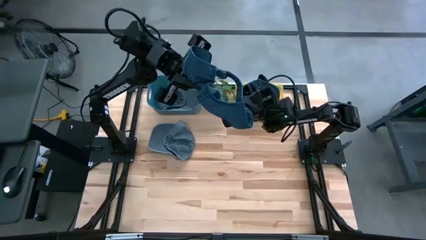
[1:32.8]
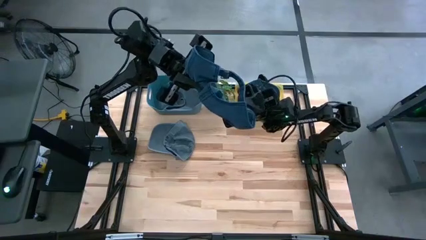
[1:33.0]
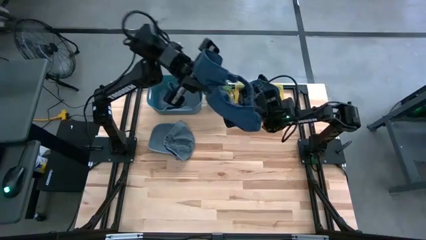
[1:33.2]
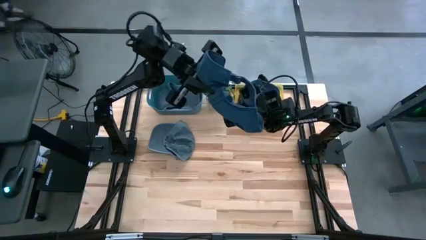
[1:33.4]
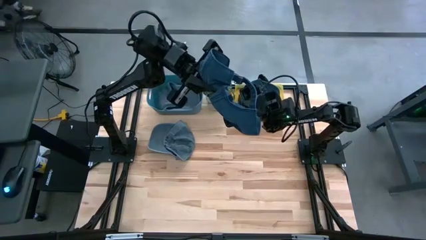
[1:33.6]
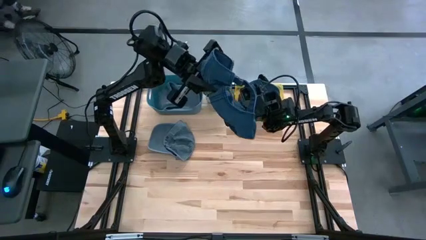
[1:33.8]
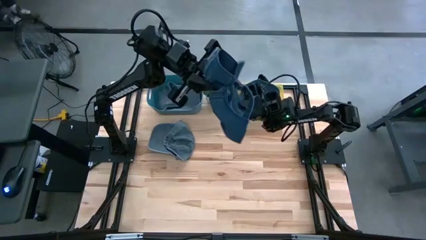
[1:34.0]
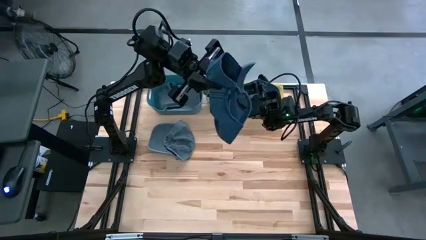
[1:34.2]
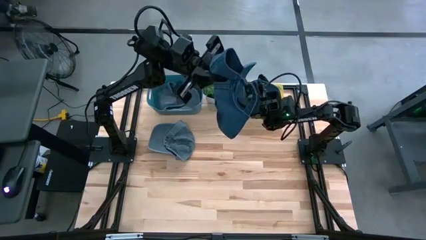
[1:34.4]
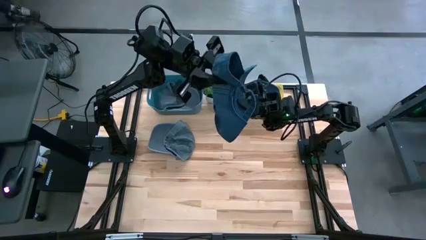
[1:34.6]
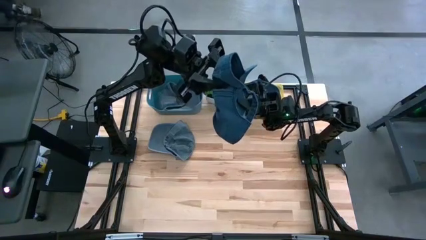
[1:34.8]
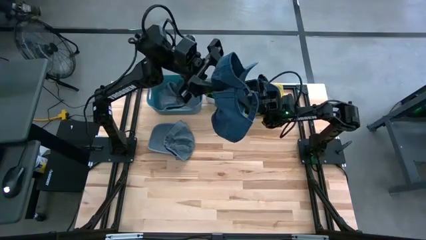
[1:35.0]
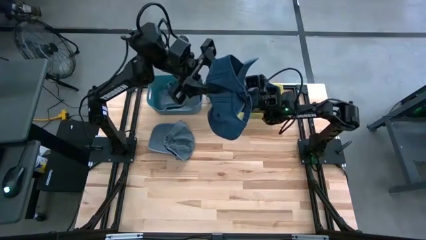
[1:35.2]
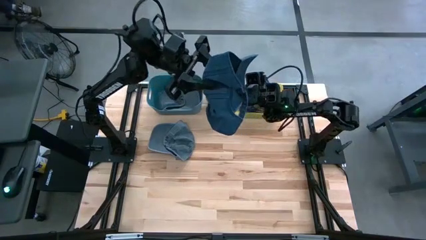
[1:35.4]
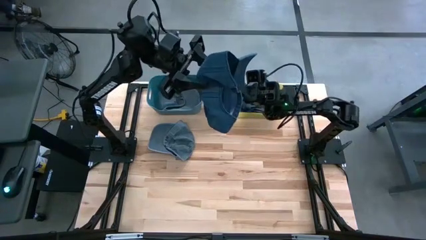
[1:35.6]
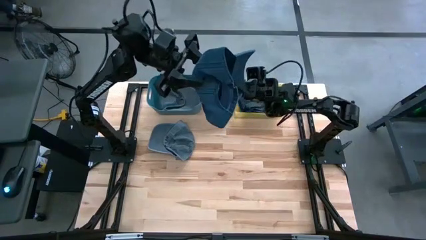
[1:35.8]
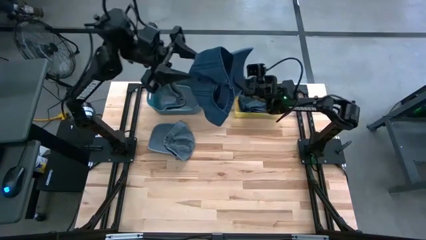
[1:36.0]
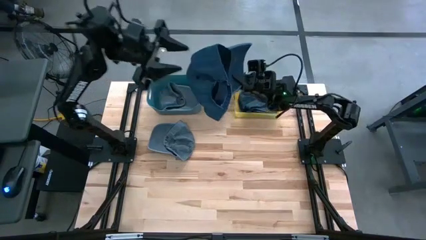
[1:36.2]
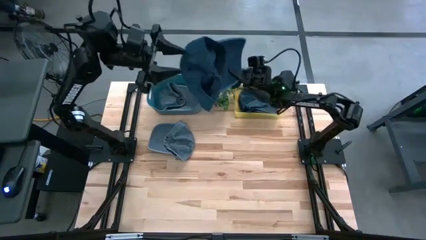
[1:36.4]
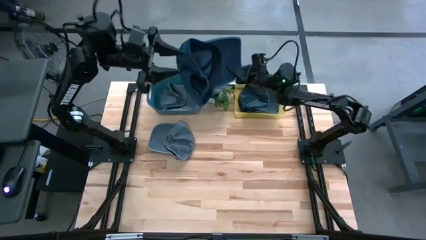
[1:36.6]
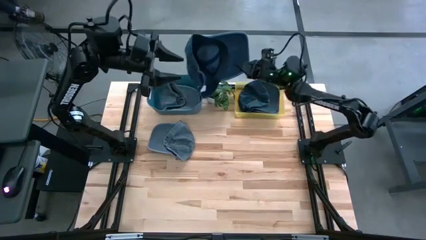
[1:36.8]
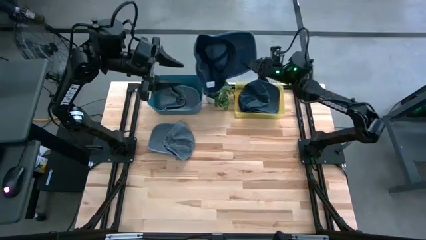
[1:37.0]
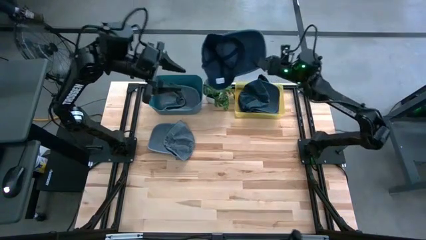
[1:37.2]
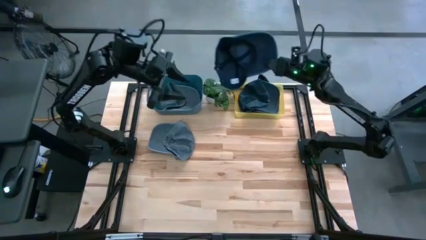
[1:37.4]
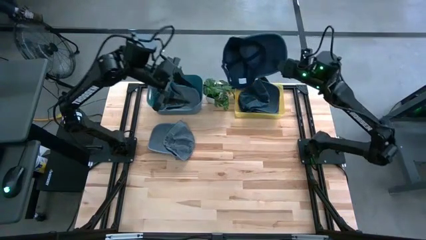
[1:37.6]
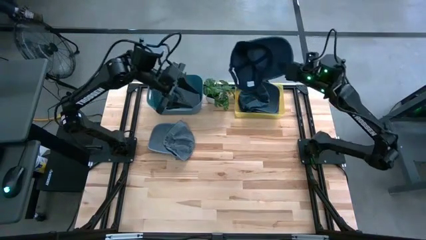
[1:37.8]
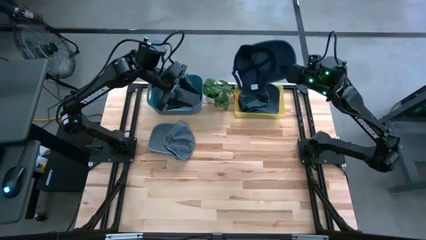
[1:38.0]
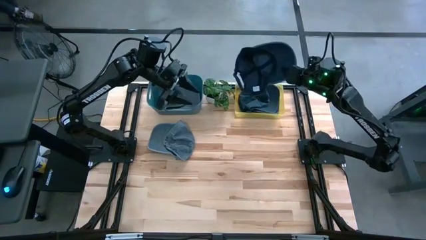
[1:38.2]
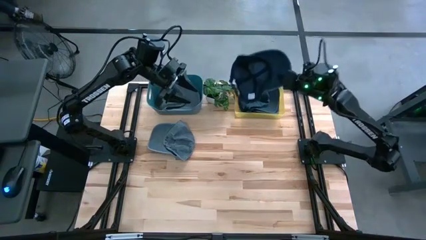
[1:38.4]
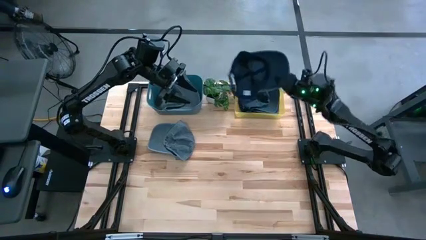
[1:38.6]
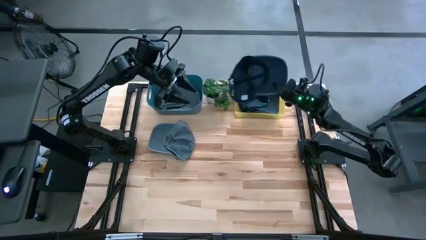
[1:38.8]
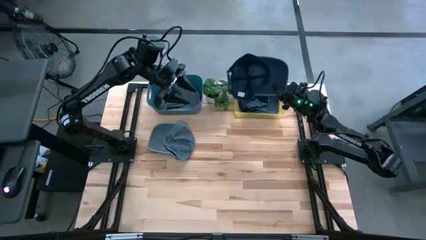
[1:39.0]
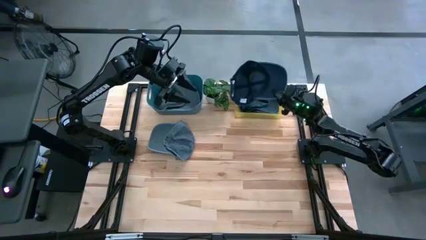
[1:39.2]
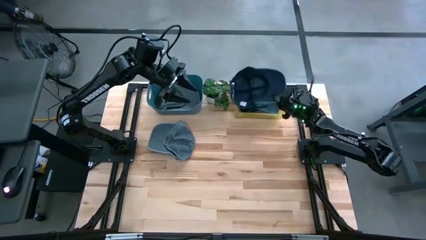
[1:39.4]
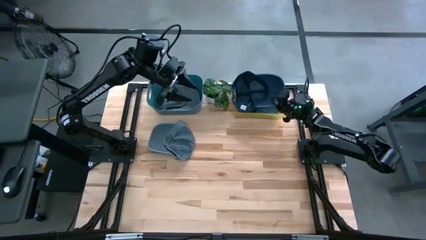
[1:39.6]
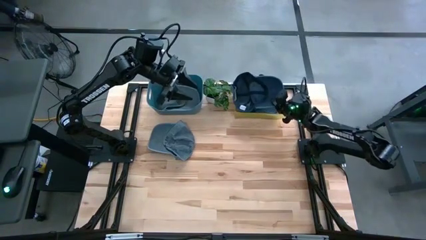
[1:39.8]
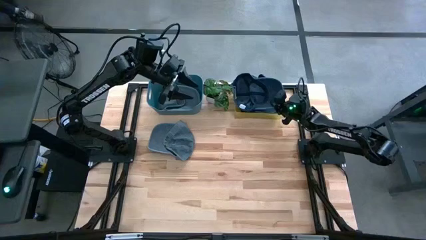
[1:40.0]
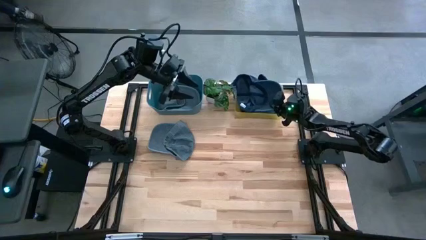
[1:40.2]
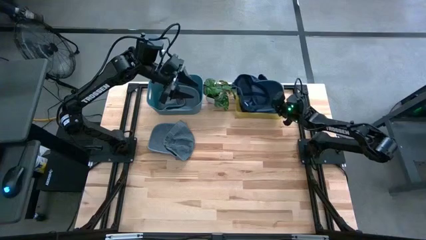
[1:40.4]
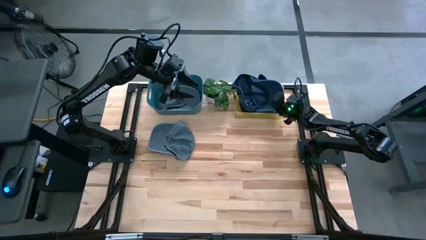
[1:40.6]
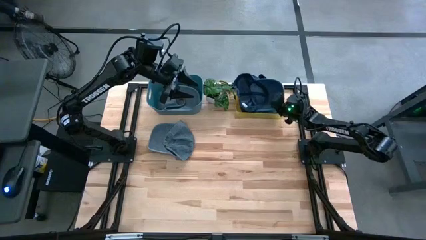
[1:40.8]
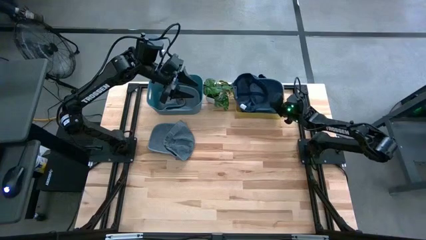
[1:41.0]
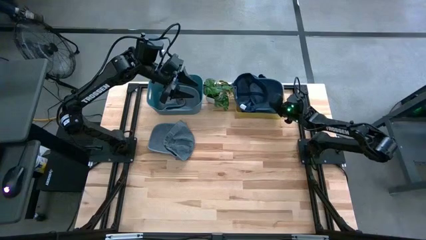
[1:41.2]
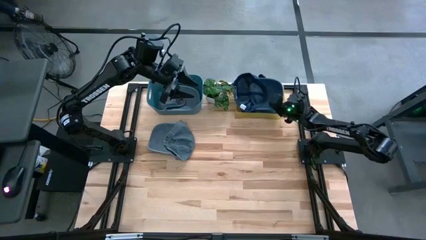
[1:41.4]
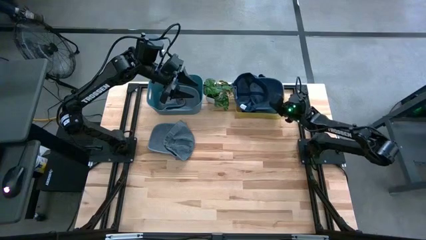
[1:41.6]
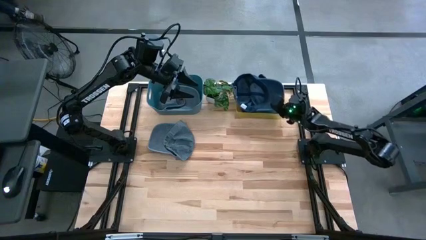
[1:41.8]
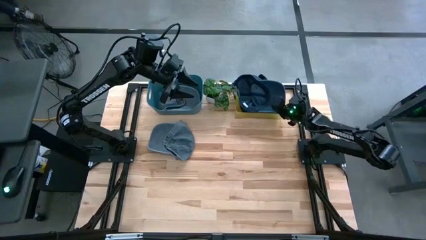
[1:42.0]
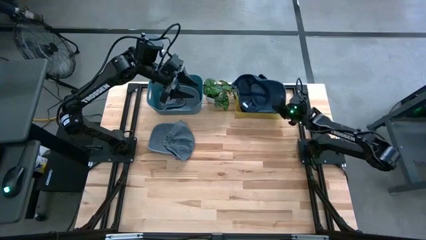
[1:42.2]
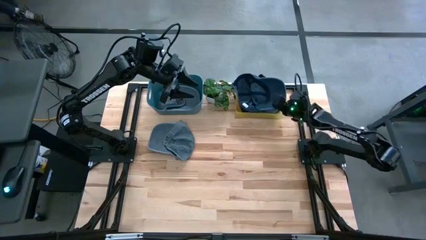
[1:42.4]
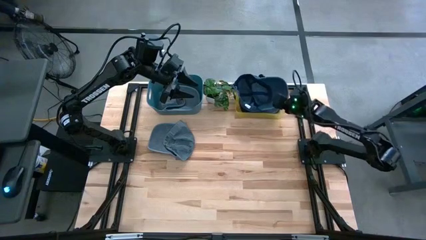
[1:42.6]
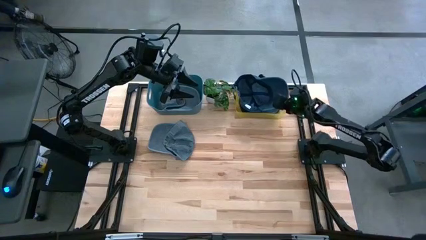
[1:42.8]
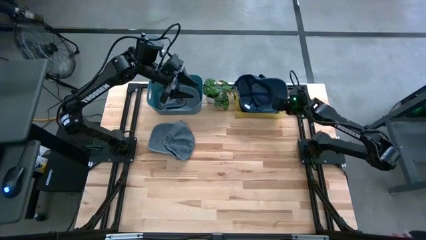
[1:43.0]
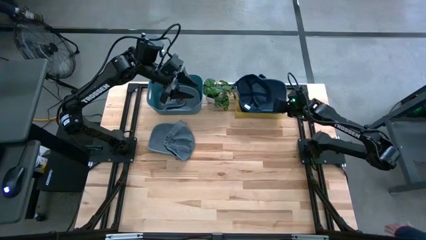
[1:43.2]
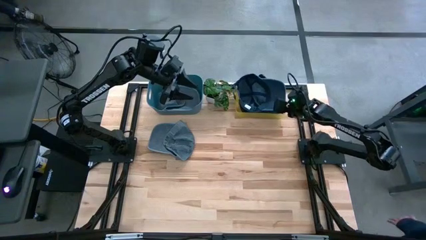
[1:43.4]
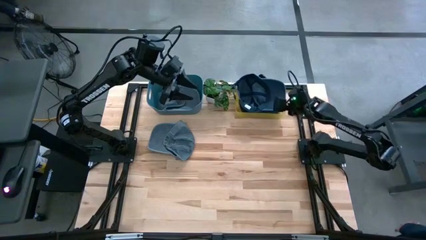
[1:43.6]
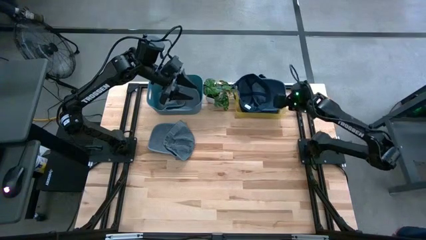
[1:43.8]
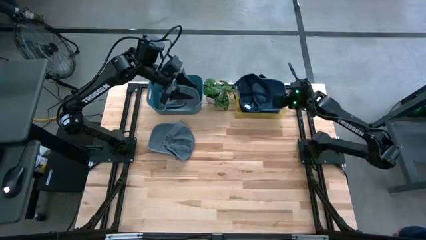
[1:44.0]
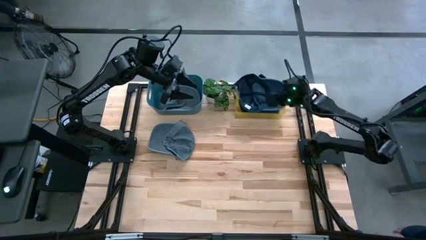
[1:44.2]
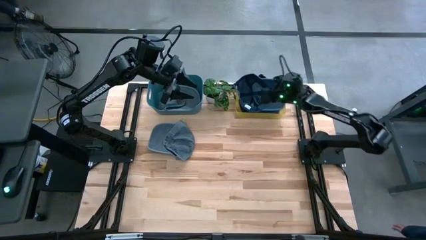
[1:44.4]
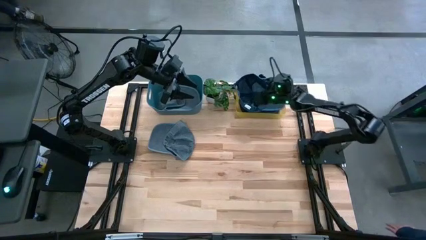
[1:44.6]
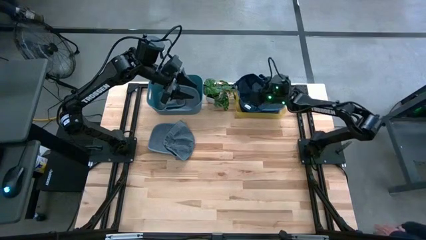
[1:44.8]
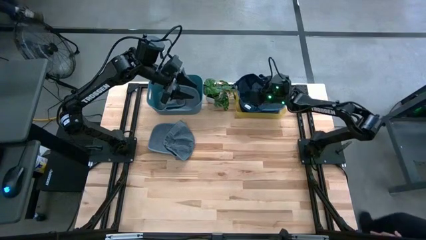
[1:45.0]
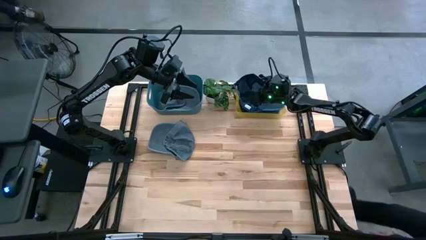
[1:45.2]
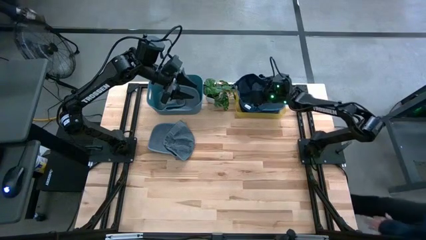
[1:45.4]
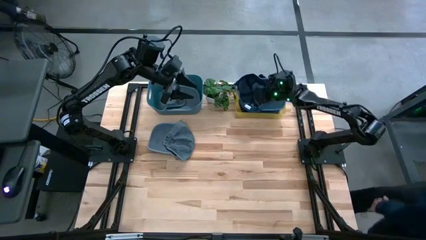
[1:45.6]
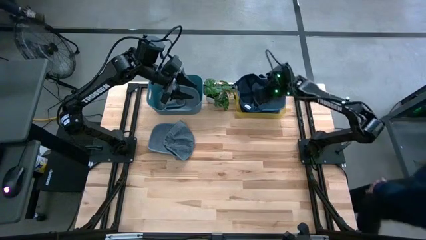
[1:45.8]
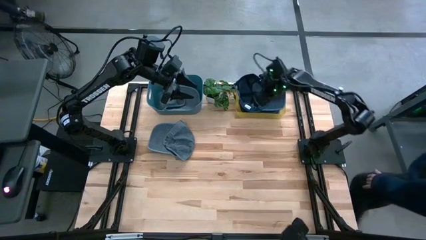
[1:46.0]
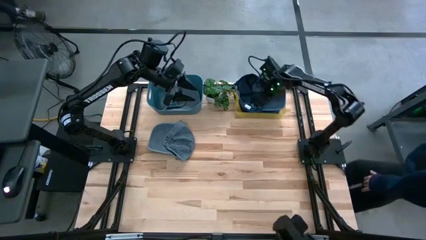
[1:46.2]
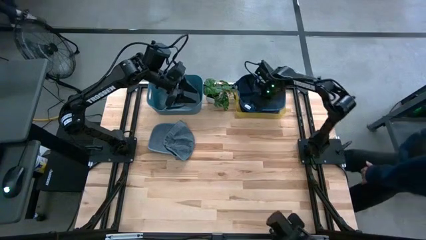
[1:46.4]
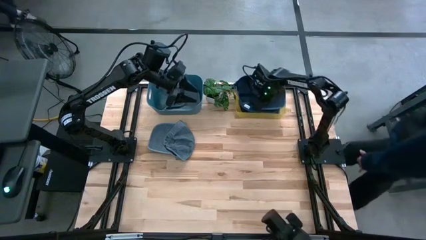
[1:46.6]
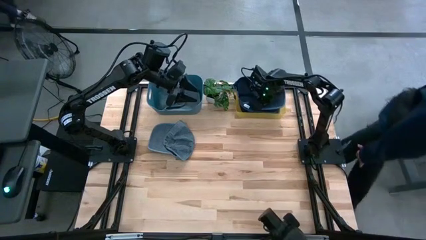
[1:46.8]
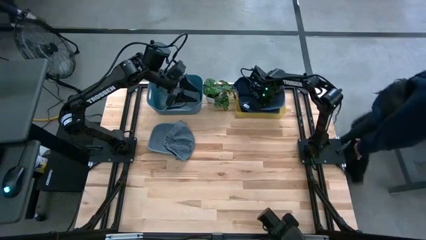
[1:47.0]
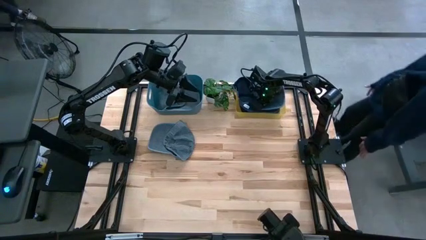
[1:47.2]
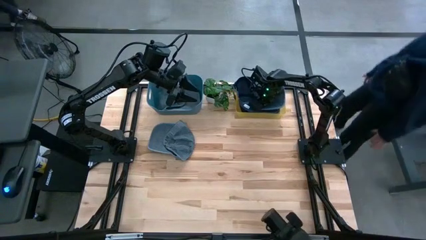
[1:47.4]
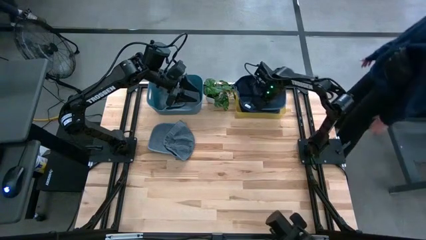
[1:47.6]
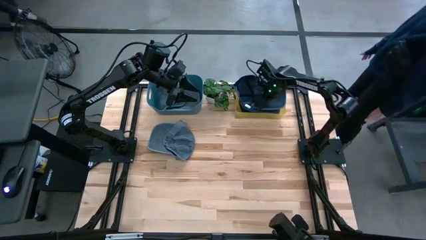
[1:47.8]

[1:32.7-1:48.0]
Task: Pick & Place hat
Put the blue cap into the yellow bin
